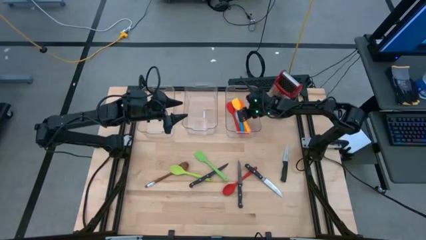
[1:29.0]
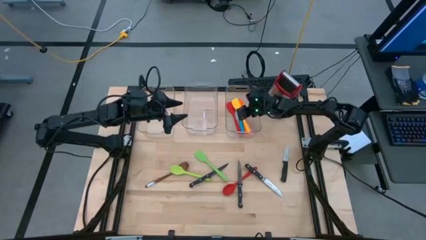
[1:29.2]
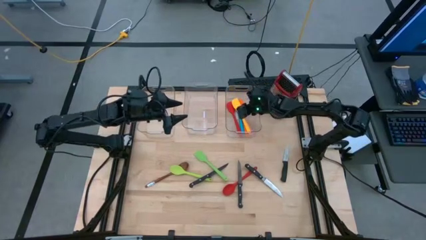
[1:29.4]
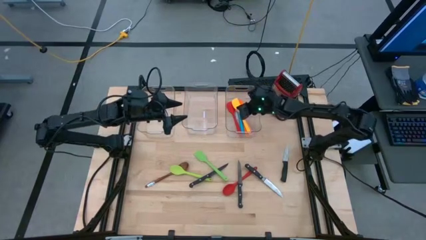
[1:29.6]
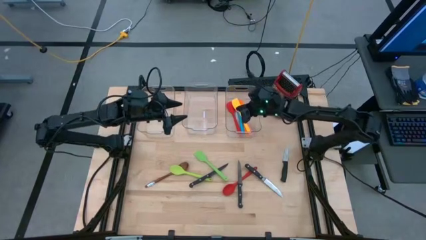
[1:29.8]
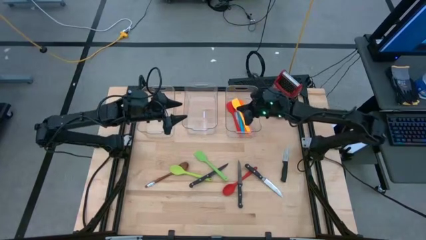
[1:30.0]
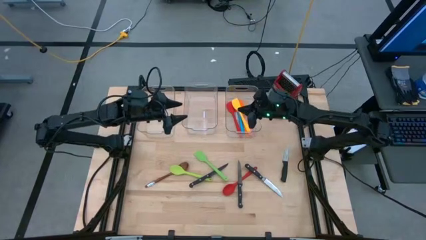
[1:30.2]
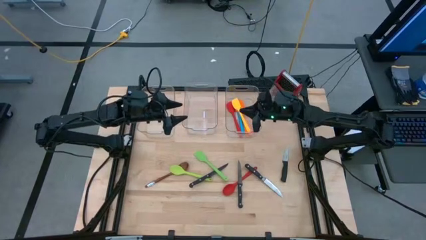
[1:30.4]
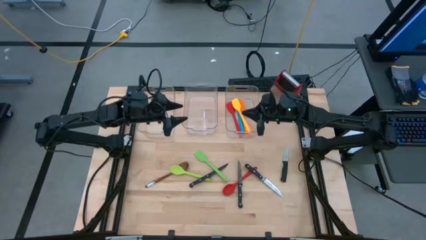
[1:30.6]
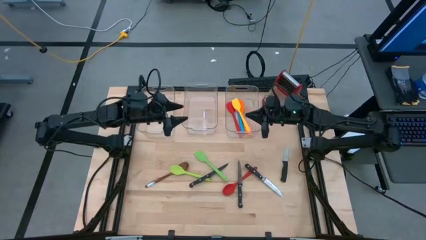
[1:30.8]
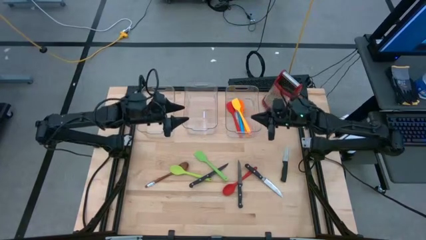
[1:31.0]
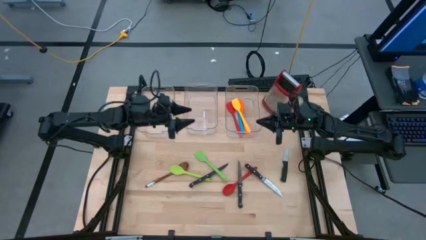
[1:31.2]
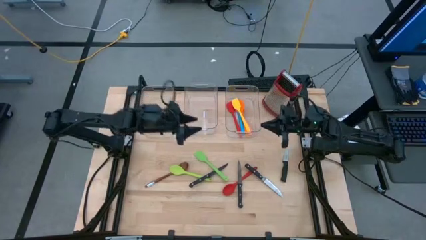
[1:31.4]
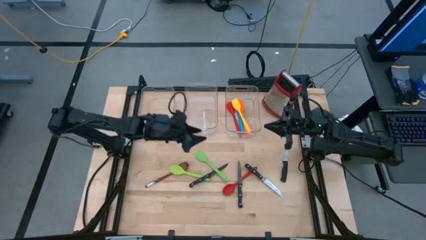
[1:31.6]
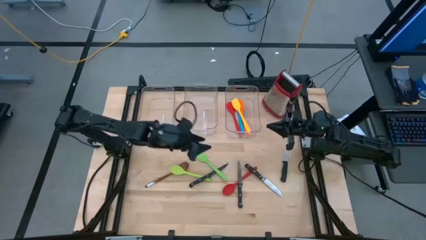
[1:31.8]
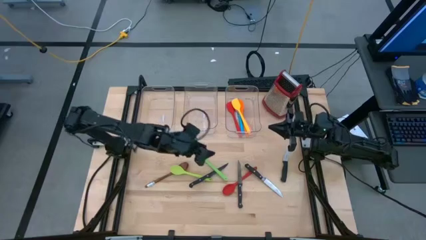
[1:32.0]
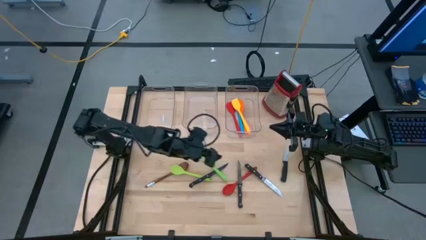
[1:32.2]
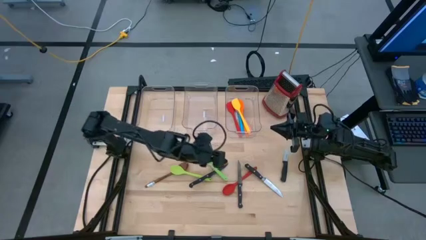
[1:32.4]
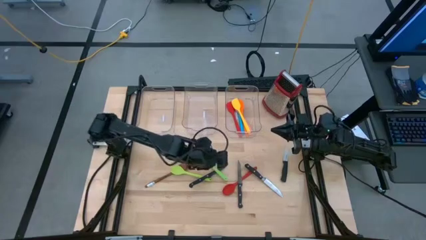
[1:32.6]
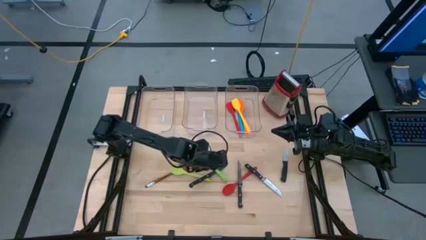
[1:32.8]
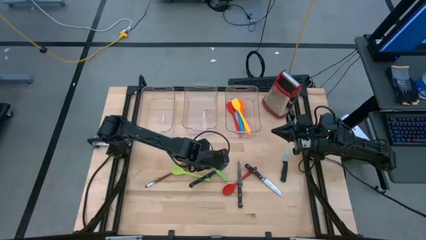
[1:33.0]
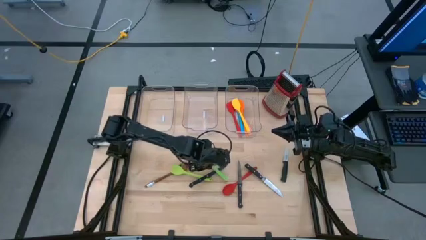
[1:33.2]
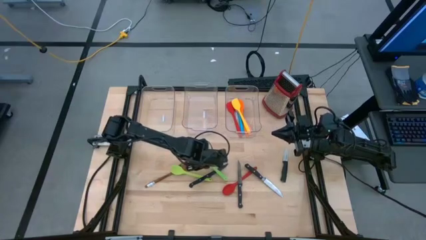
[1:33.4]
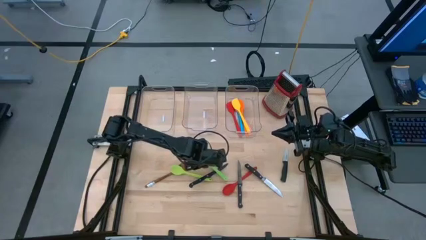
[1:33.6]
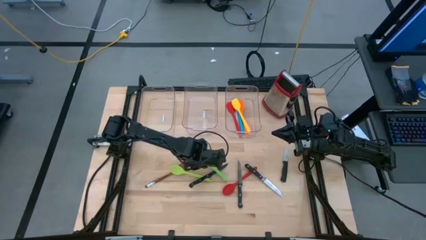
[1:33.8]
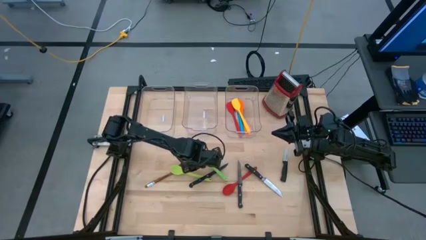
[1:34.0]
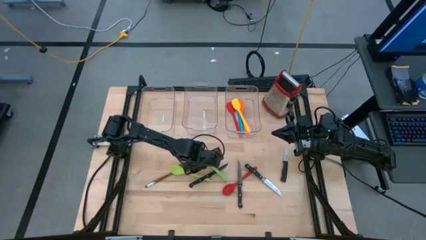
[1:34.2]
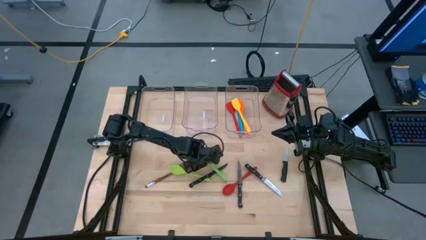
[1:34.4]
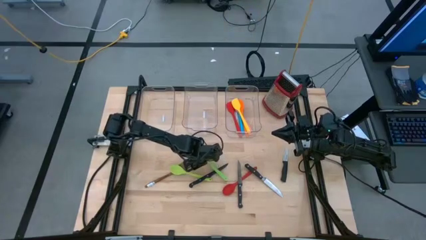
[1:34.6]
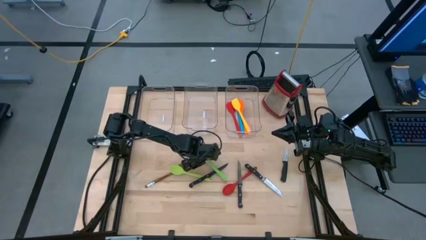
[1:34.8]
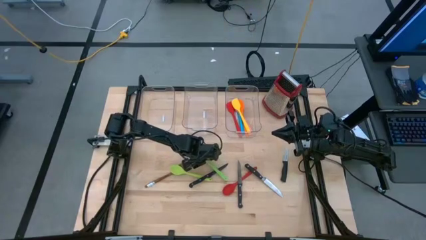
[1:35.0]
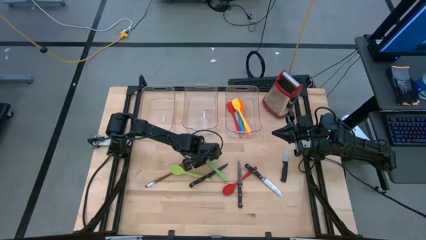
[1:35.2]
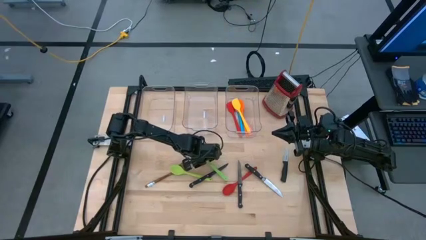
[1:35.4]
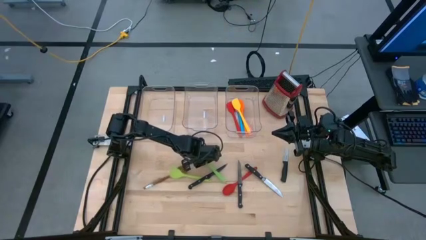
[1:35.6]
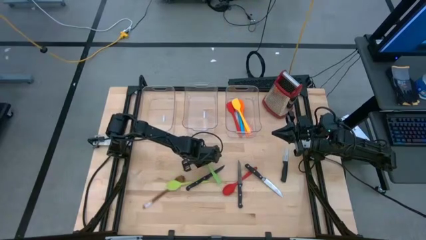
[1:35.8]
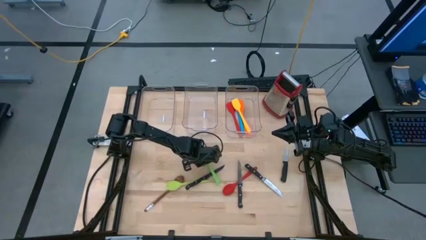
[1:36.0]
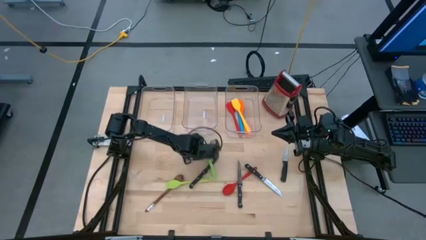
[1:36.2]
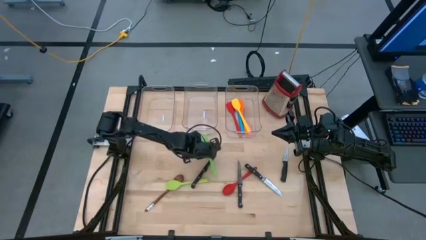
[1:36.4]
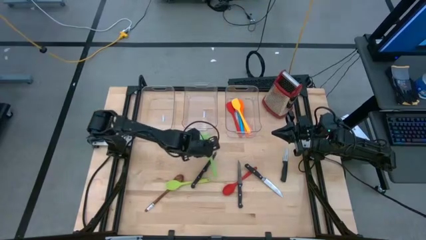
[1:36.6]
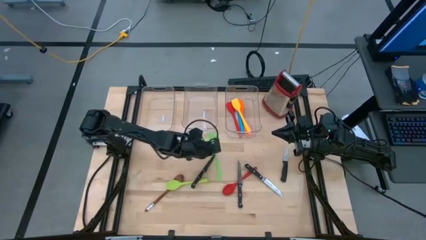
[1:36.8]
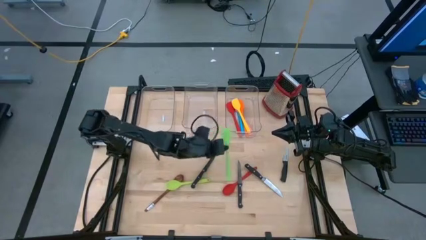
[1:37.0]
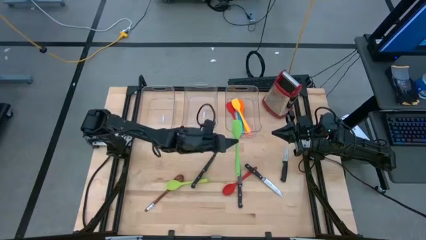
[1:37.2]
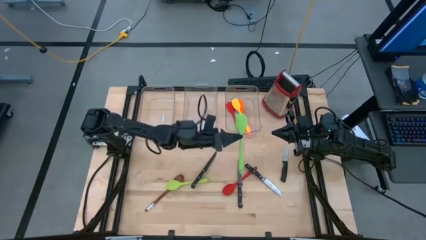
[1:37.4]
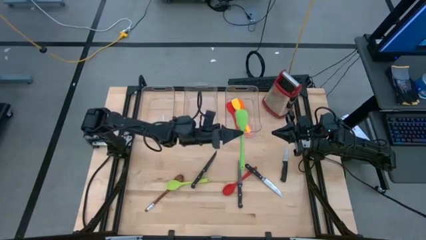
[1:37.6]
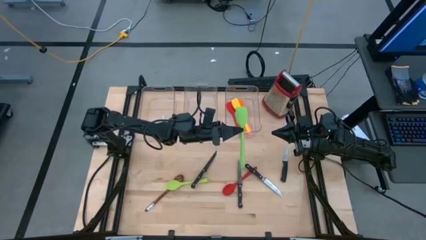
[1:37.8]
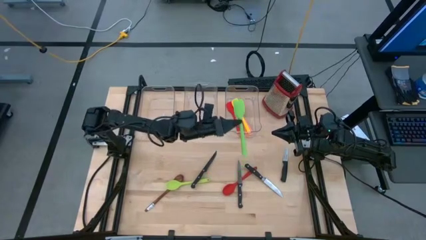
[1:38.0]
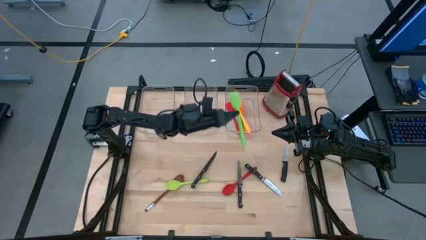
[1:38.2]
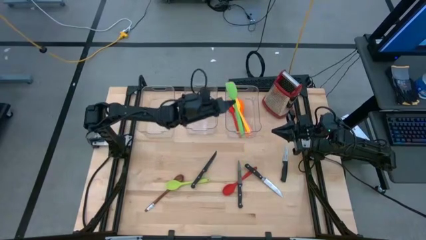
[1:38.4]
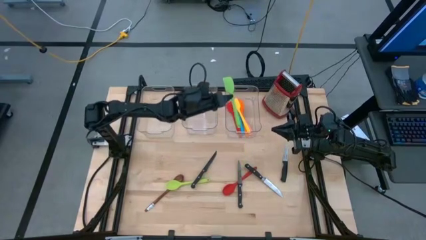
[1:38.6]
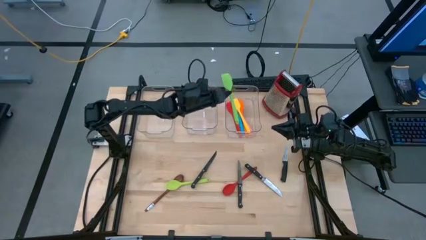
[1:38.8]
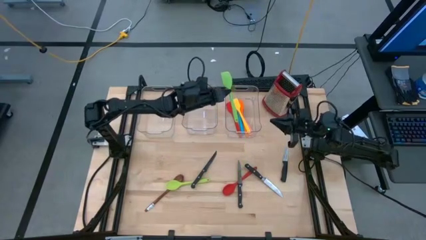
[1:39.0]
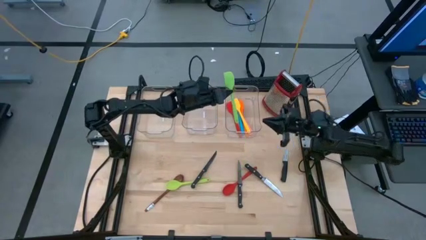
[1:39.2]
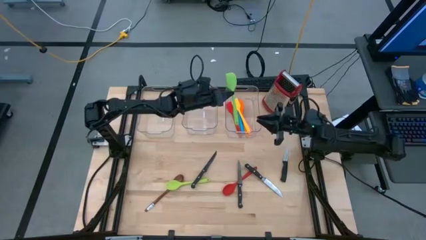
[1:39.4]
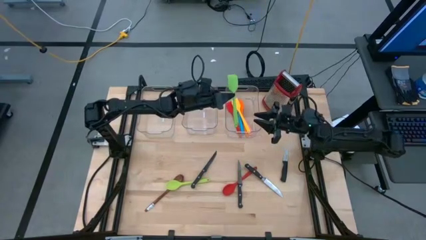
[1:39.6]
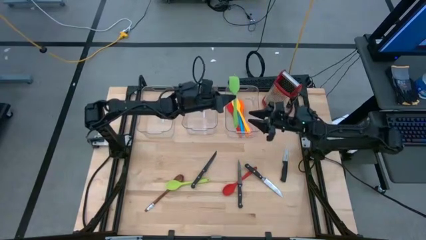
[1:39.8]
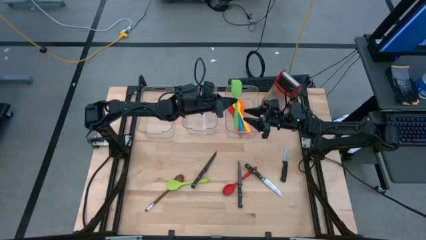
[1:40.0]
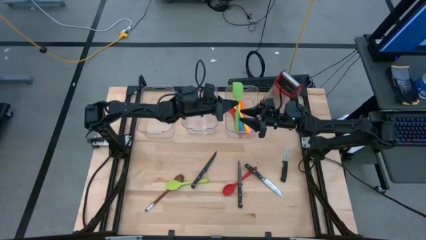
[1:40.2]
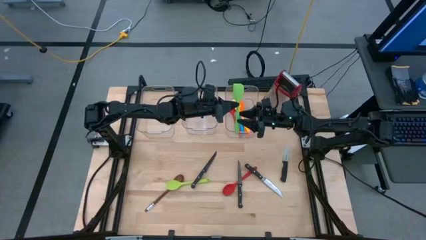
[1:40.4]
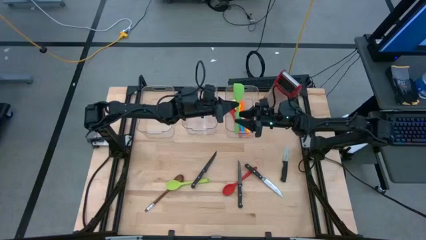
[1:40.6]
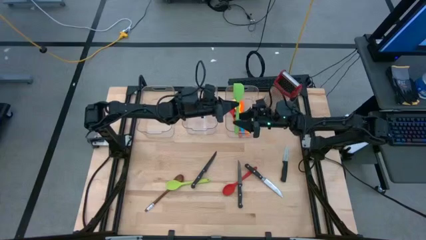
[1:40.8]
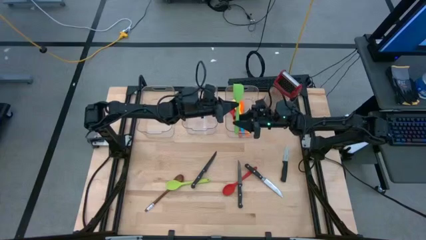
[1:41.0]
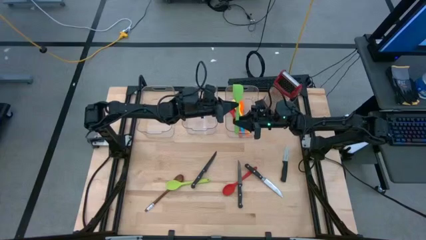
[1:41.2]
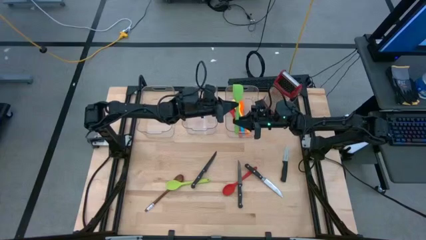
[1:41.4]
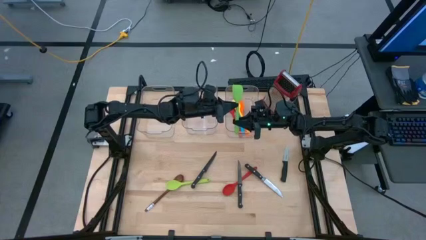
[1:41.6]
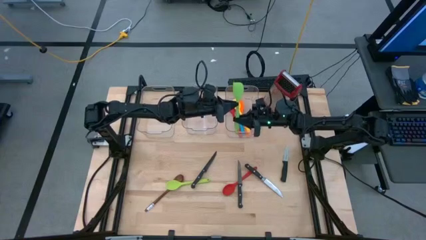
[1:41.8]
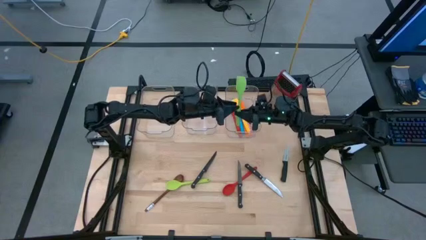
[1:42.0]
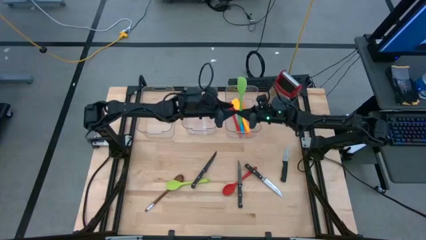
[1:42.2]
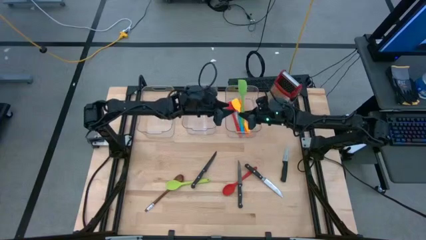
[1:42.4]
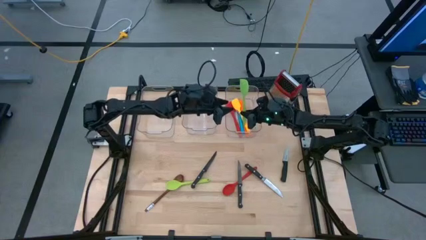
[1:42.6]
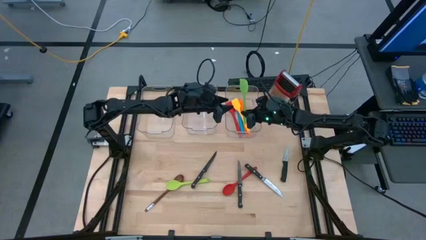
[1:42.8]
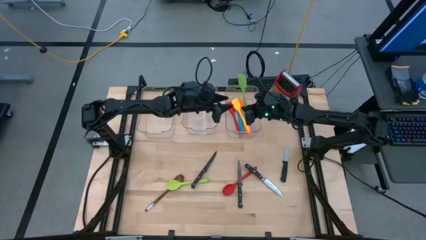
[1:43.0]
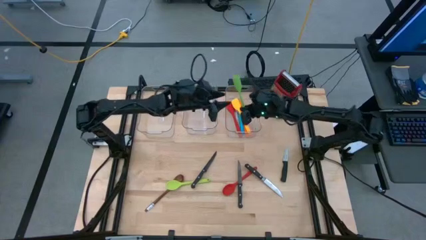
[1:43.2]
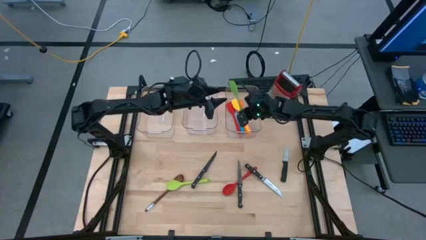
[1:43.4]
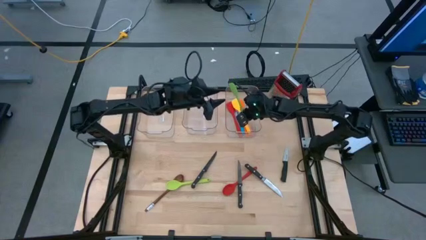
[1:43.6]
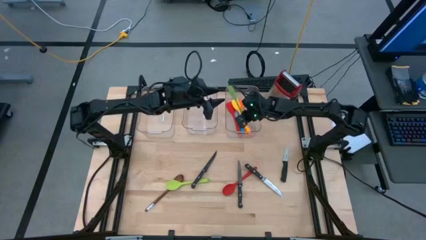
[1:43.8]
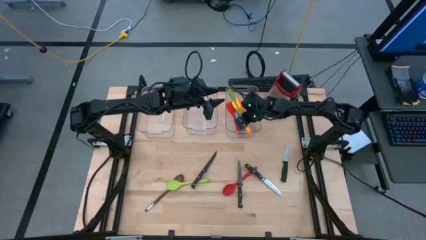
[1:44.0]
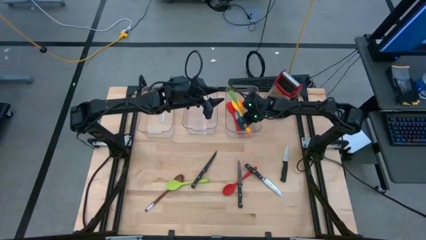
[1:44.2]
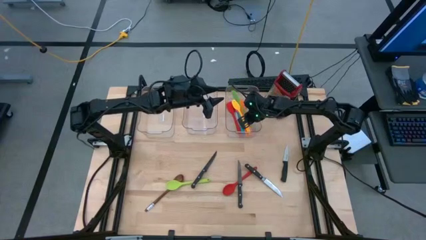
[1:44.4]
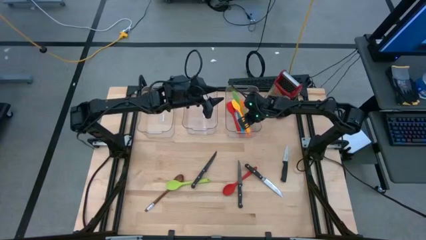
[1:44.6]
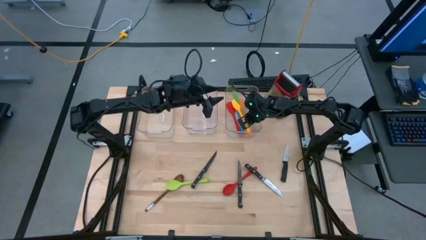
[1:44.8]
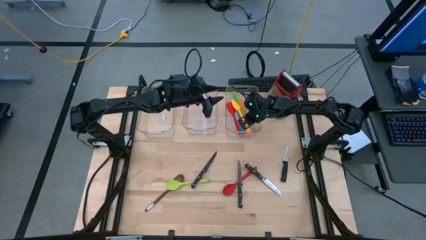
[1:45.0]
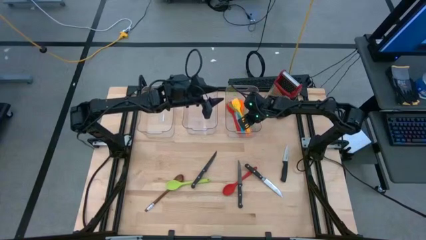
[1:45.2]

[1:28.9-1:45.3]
Task: Pick & Place Kitchen Items
Put the green spatula into the right transparent bin
